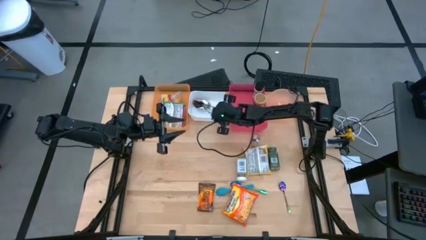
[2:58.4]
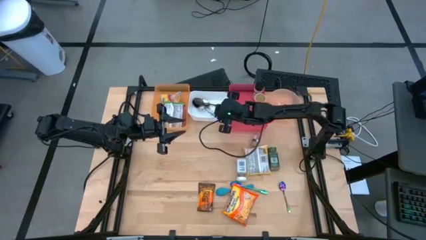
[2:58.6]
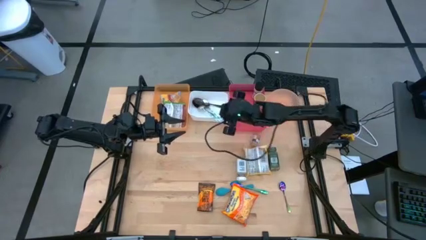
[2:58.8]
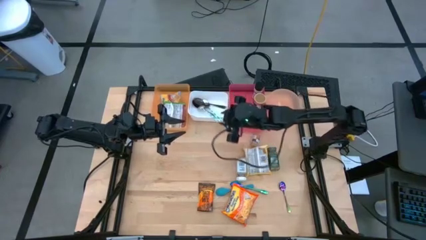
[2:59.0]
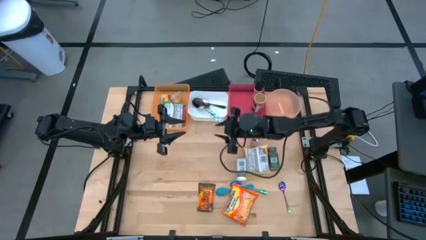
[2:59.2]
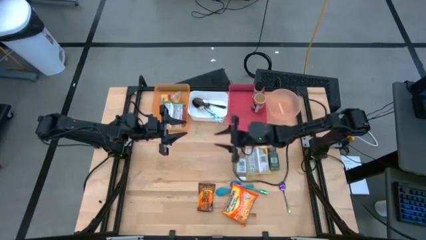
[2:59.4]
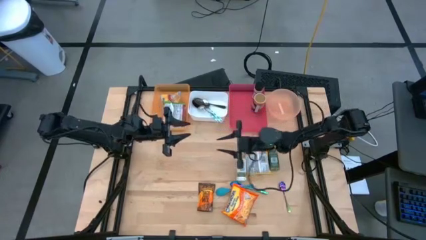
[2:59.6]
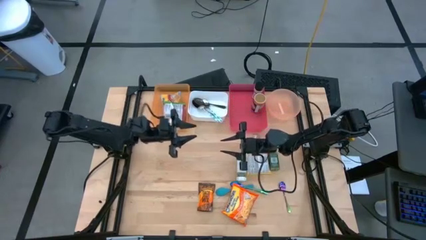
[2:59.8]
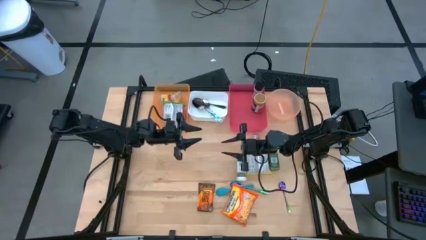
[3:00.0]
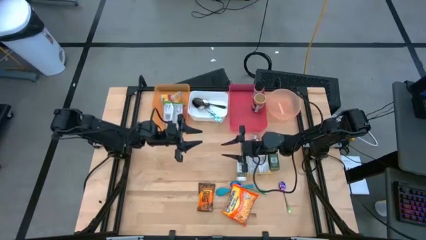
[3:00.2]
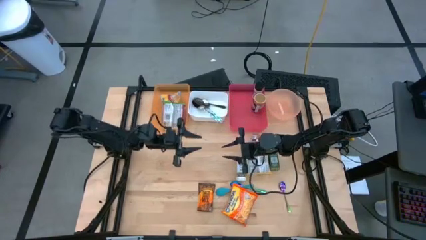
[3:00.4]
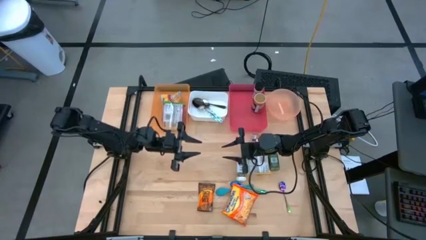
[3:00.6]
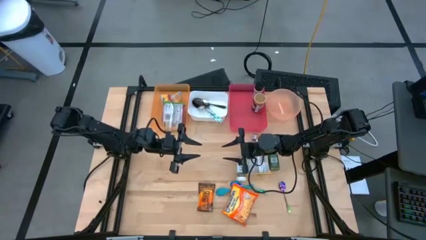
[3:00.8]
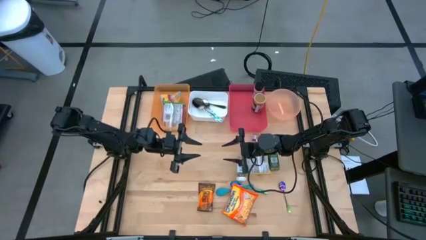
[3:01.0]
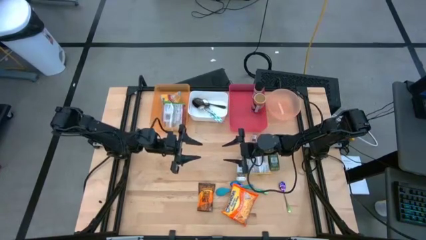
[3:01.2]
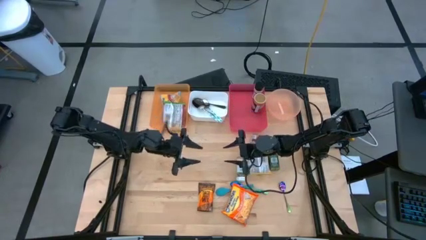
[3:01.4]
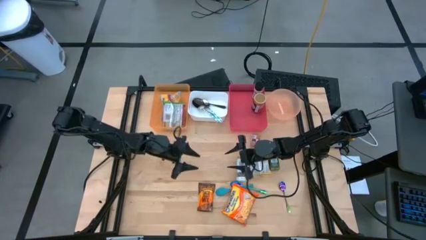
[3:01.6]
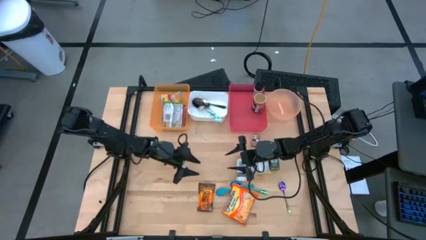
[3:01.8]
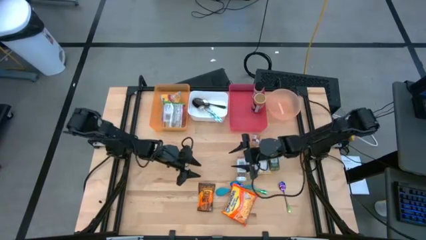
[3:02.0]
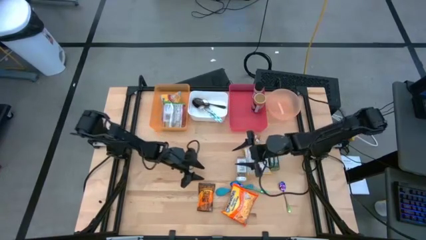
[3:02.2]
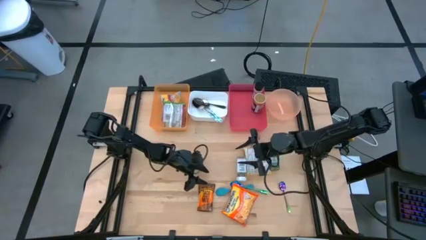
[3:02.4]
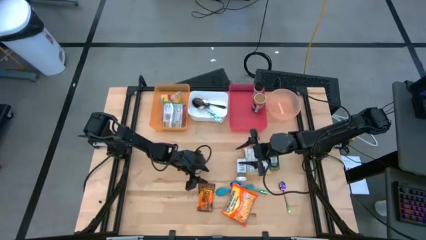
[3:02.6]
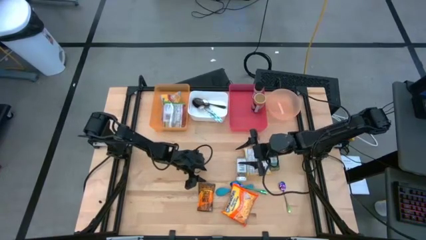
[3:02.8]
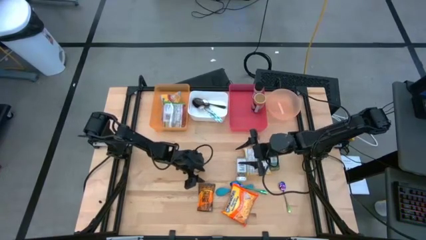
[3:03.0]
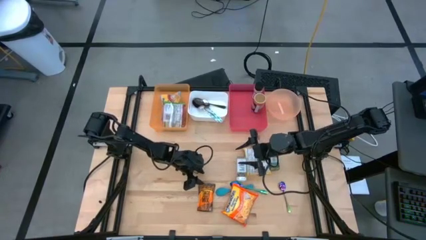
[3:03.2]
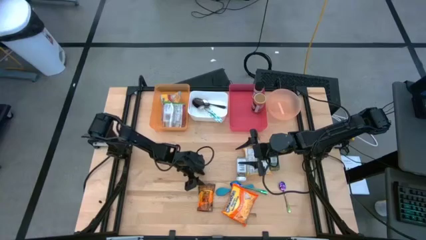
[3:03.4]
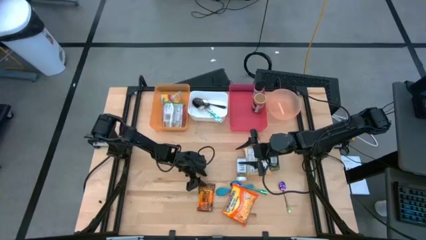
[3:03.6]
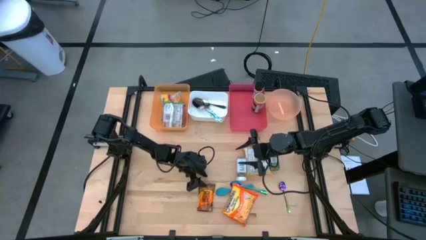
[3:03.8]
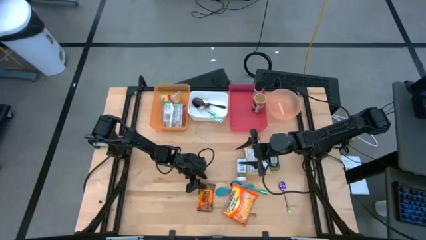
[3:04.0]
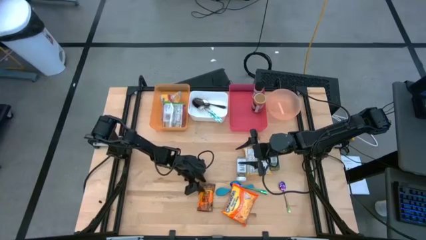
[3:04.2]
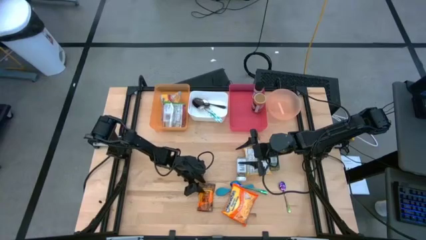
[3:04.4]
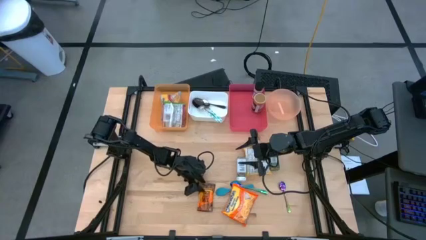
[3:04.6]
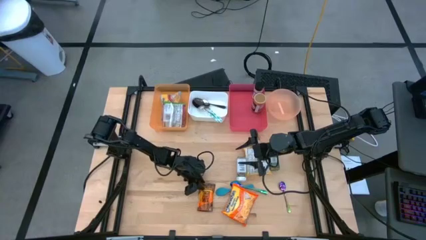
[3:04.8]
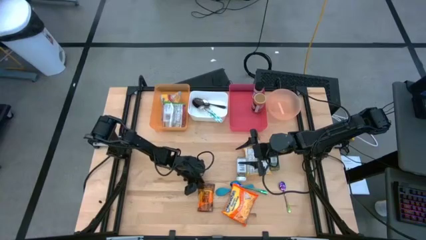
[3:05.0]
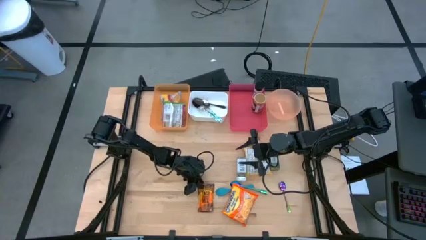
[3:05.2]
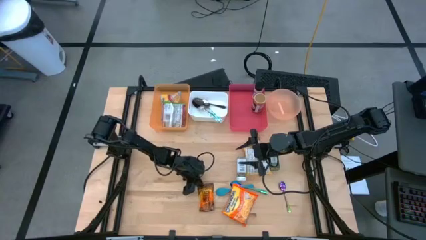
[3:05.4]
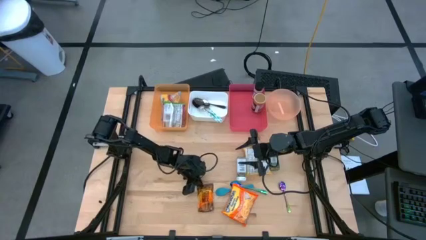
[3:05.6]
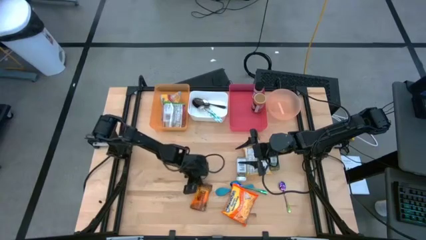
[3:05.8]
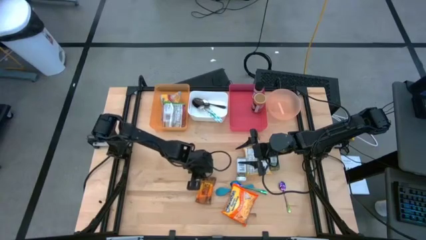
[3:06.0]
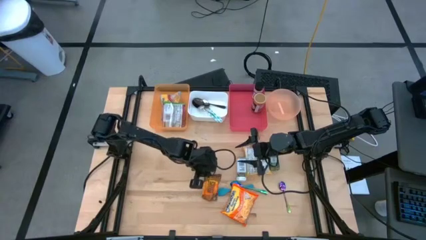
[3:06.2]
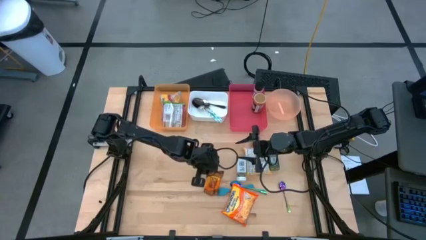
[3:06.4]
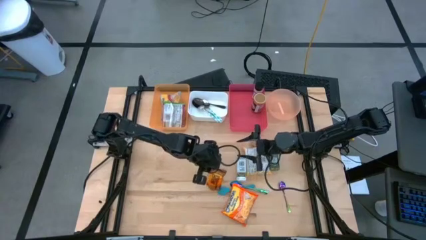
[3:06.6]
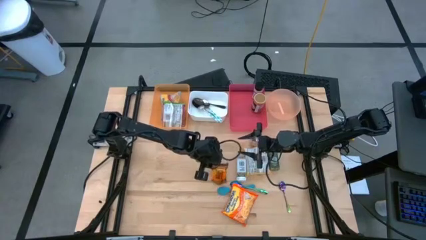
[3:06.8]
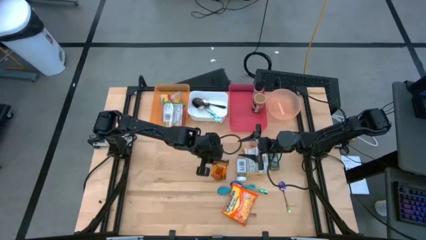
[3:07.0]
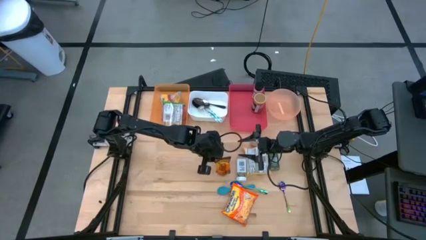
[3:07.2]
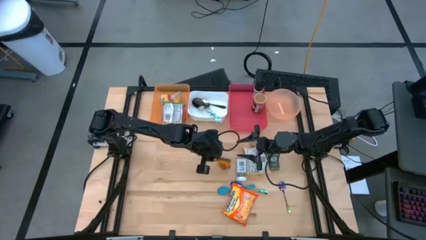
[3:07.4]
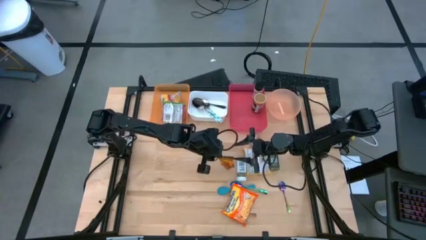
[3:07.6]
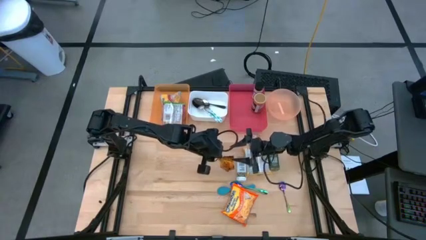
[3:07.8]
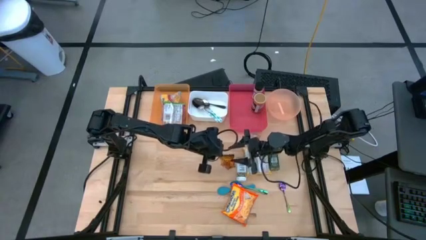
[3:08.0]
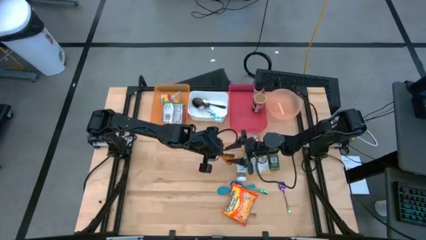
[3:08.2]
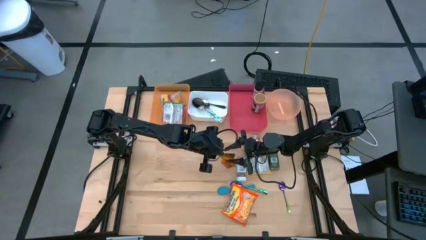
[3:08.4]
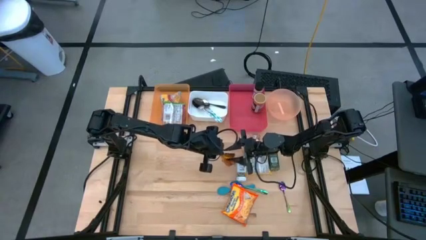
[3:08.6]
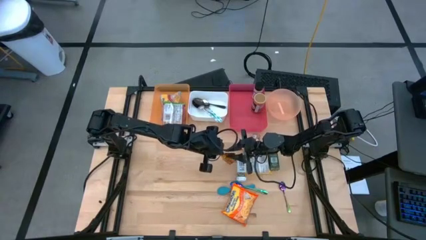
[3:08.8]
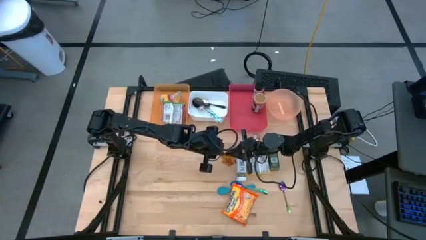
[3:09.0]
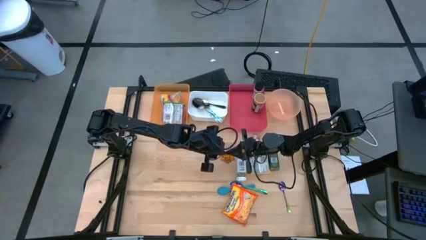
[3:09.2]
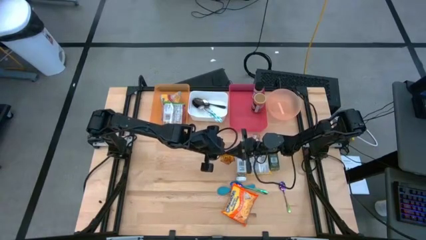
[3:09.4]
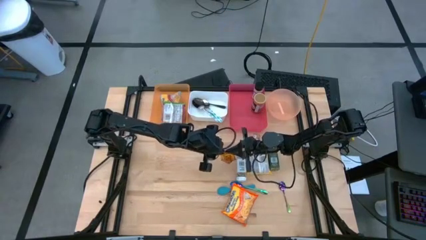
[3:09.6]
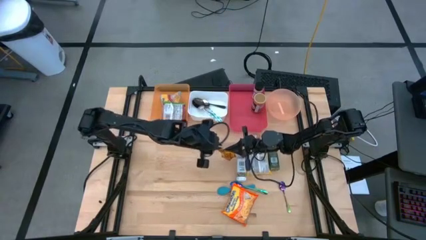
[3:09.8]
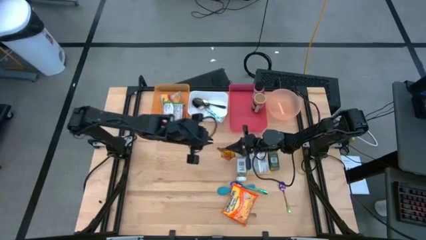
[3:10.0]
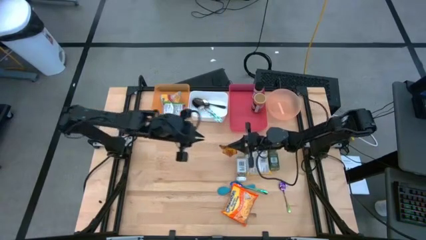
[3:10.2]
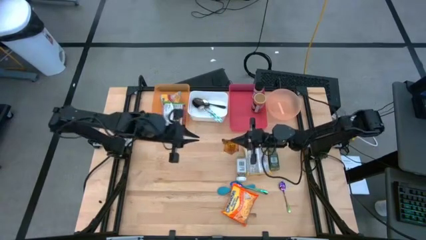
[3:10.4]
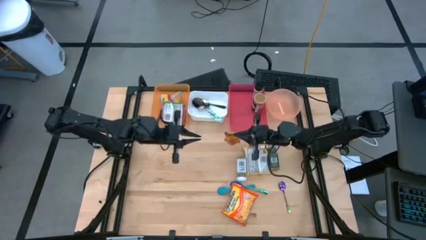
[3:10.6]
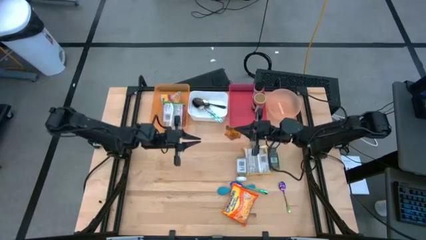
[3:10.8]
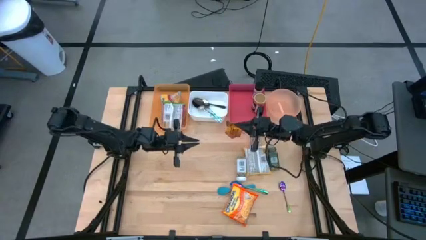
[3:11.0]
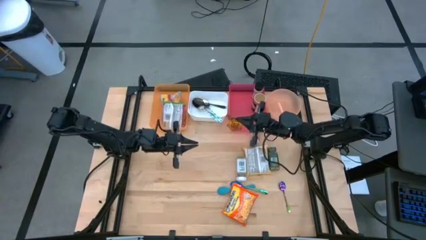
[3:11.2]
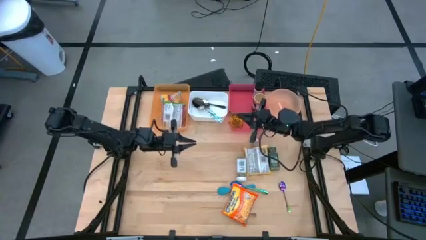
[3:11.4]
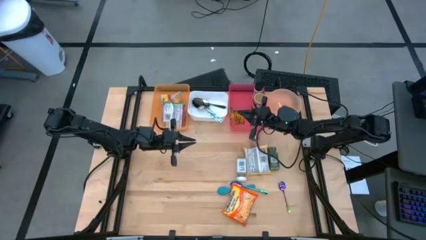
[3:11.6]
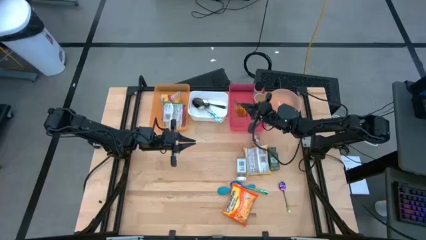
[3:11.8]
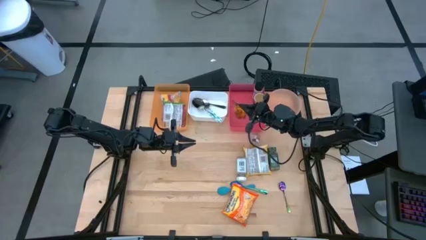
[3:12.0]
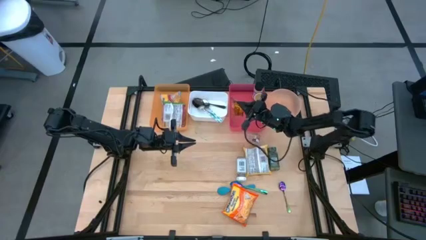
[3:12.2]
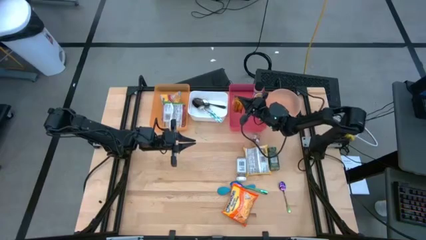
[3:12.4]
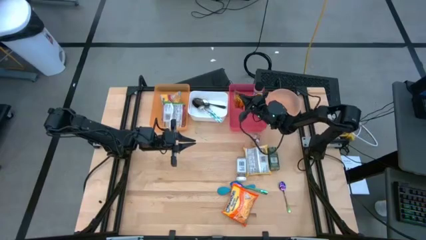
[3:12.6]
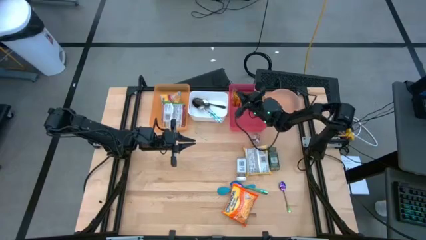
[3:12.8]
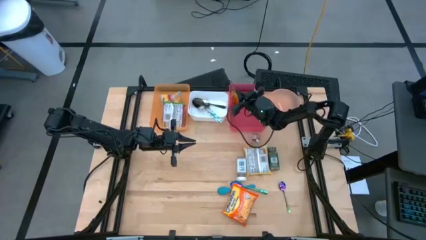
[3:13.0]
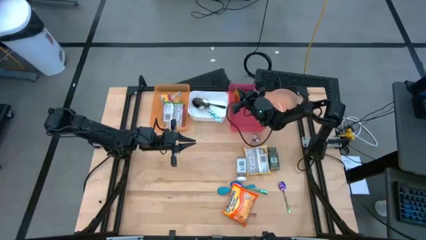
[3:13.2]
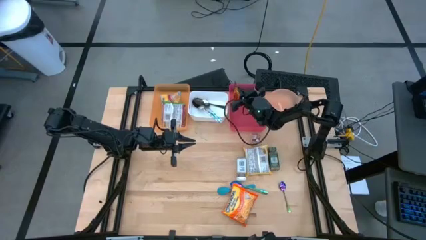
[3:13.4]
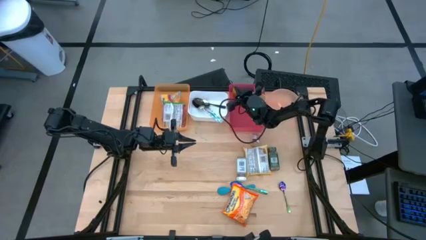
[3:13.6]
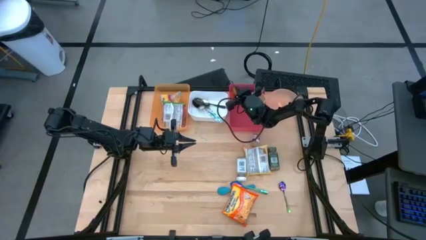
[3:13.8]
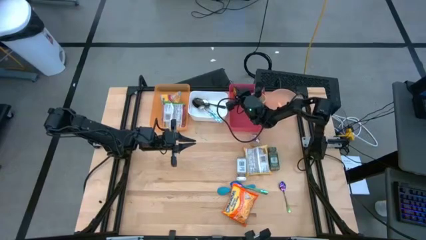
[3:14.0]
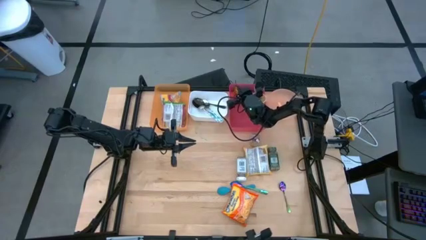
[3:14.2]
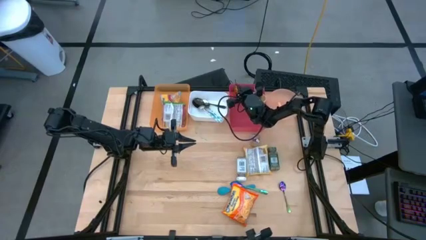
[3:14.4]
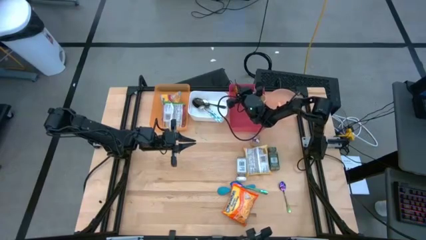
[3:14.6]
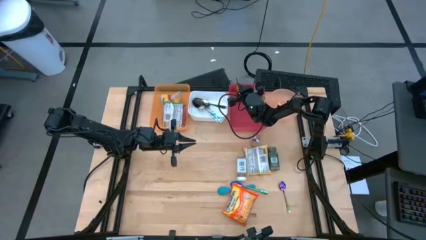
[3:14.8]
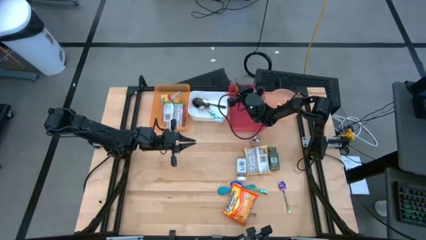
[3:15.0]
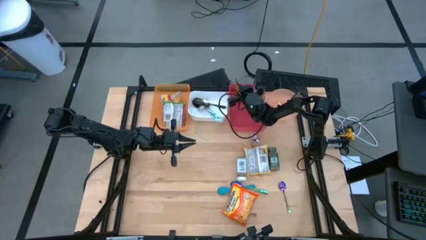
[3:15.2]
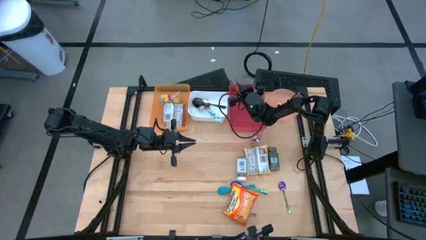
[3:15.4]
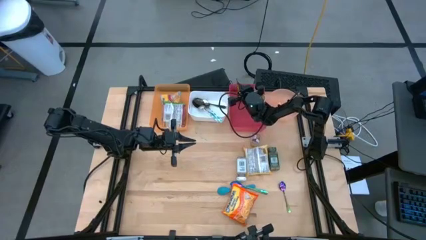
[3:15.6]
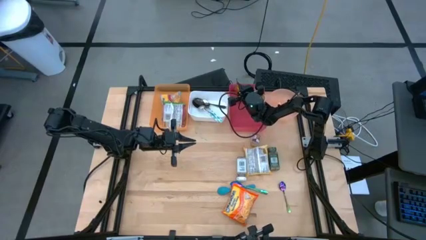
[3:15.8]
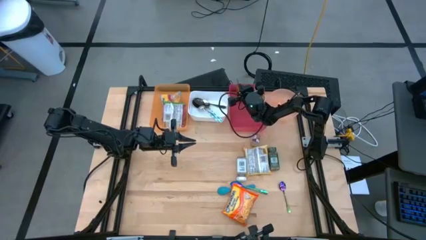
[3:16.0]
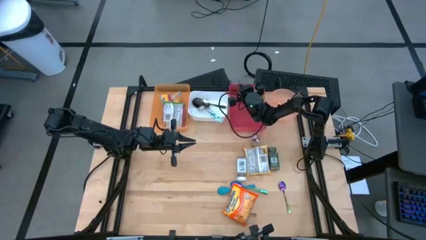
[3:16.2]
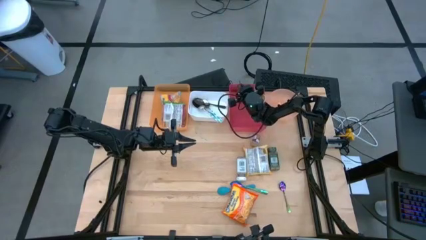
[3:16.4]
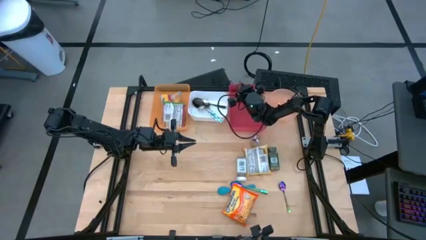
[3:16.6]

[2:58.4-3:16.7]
Task: Pick & Place Food Item
Put the orange seasoning pack into the red bin
